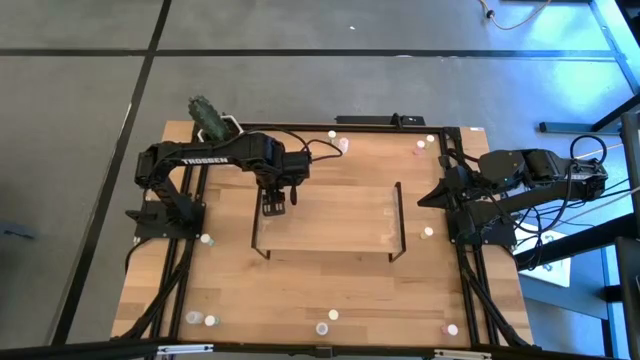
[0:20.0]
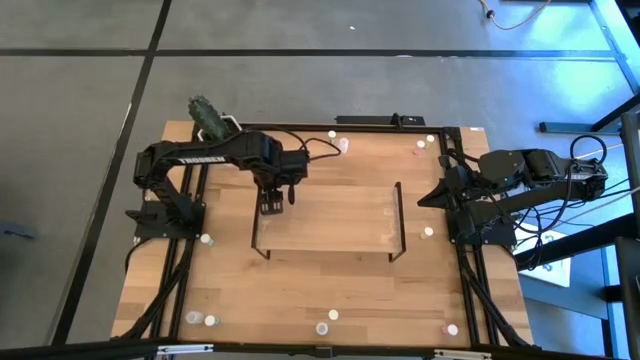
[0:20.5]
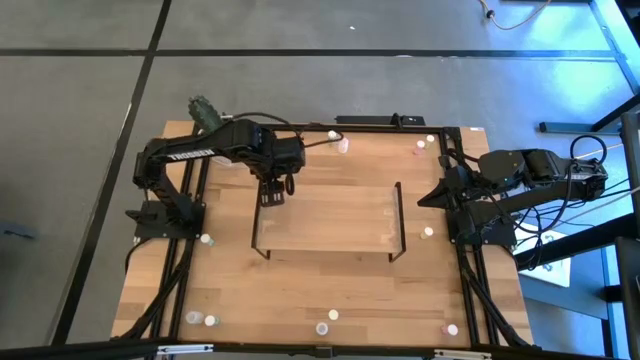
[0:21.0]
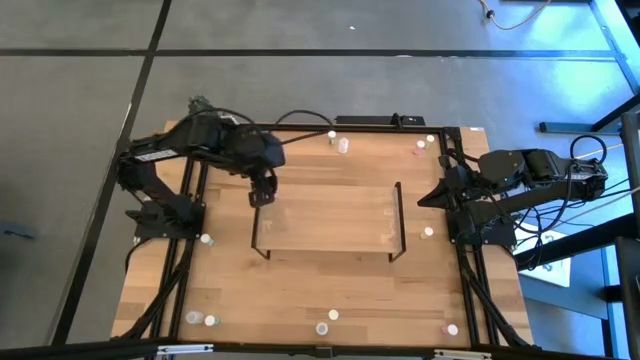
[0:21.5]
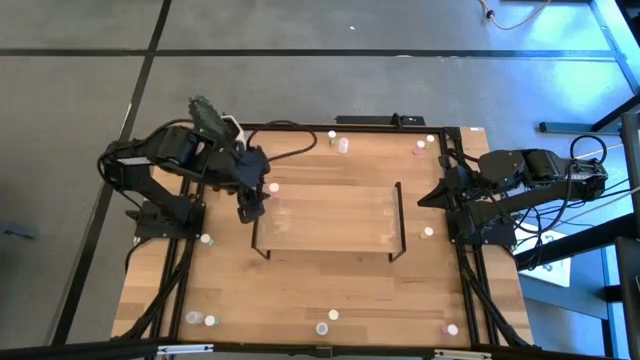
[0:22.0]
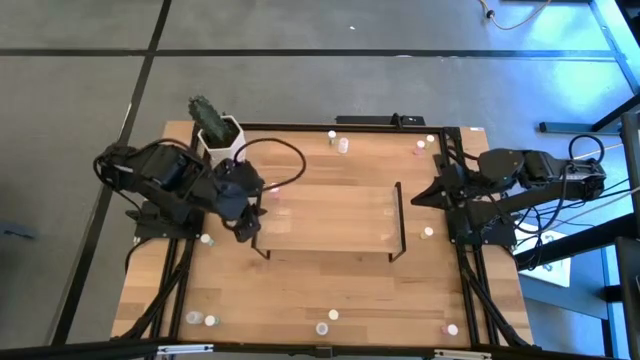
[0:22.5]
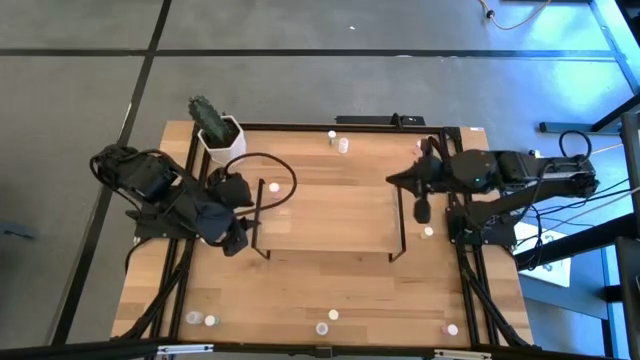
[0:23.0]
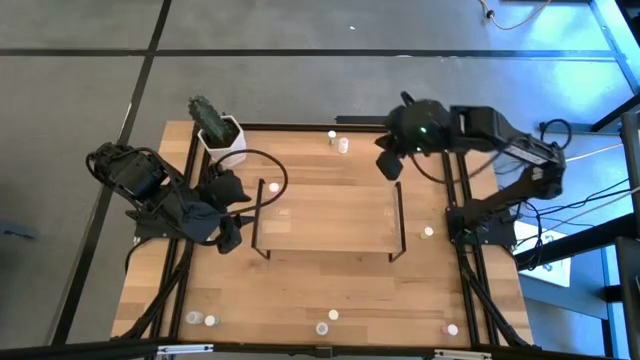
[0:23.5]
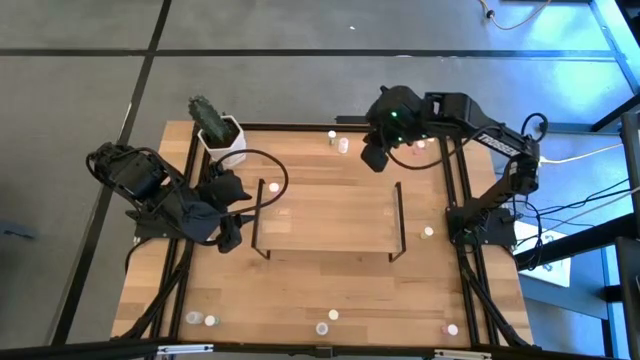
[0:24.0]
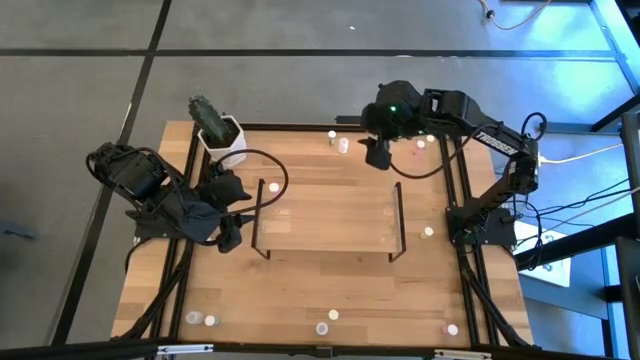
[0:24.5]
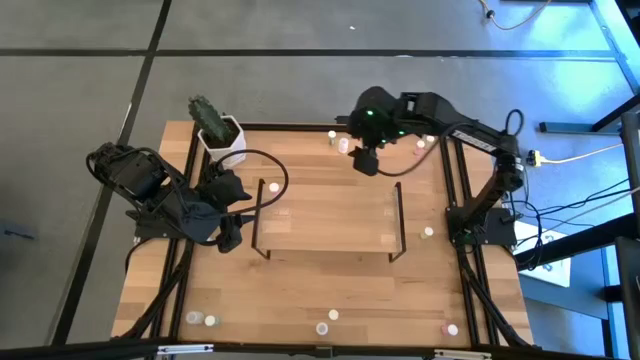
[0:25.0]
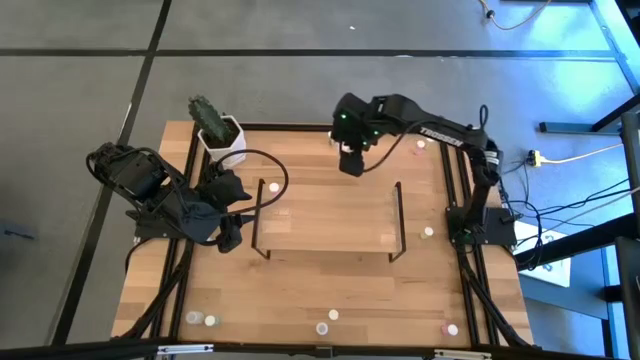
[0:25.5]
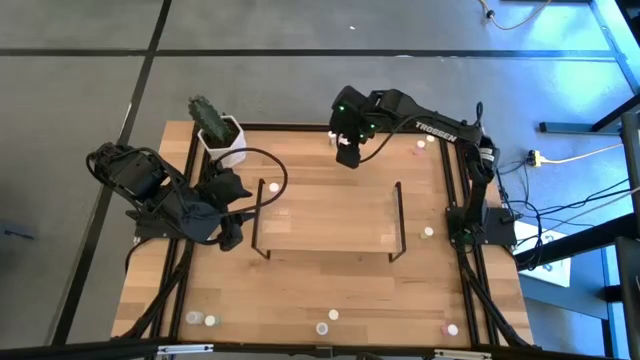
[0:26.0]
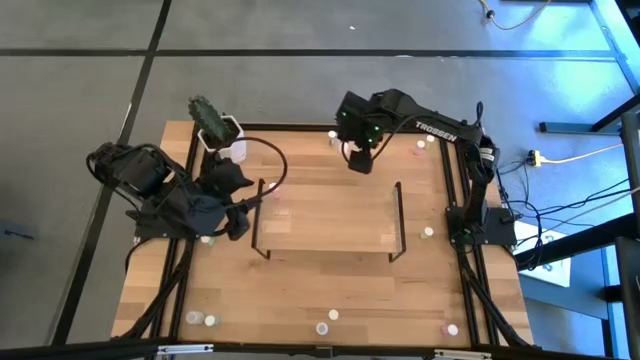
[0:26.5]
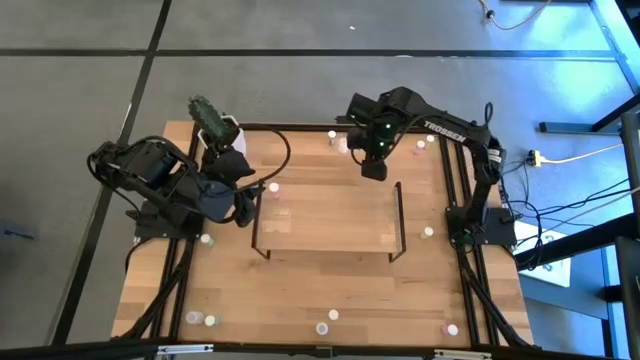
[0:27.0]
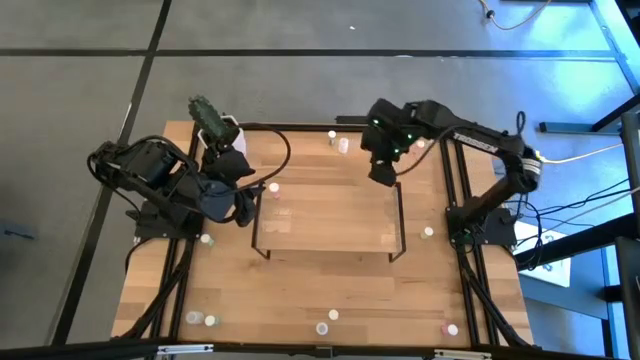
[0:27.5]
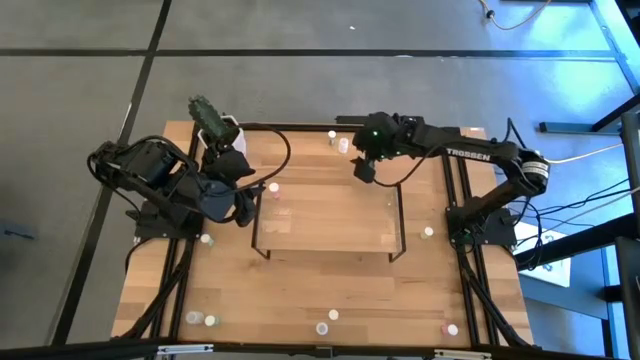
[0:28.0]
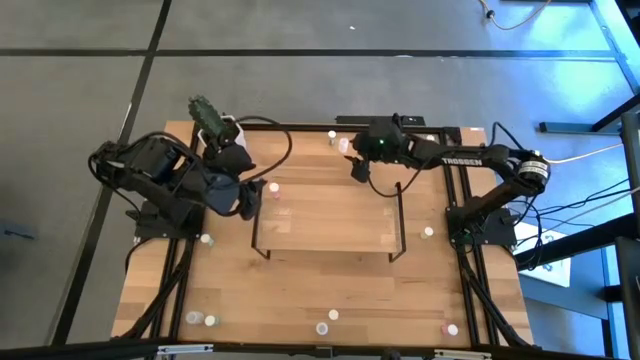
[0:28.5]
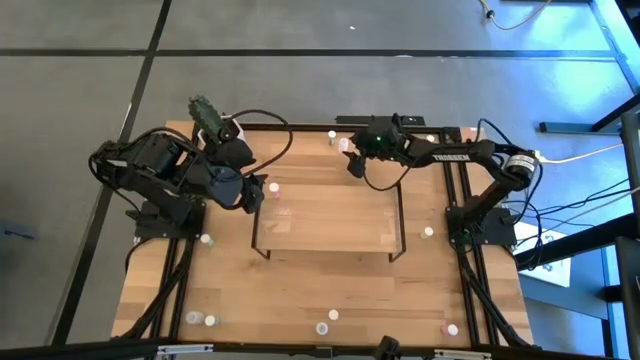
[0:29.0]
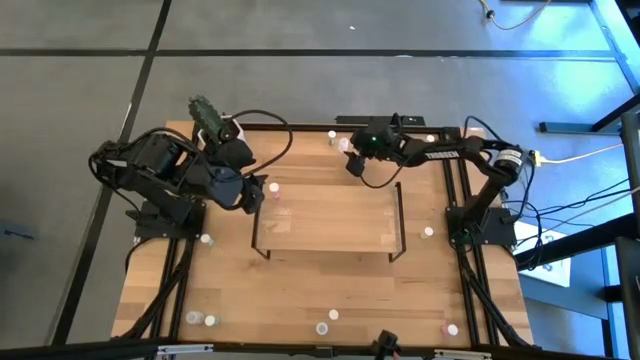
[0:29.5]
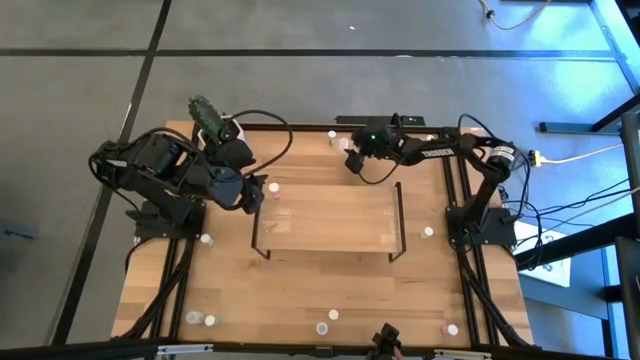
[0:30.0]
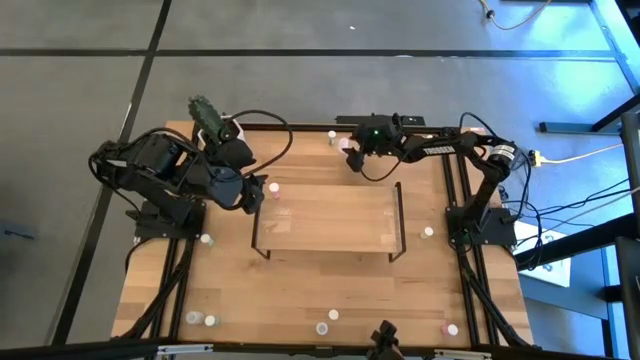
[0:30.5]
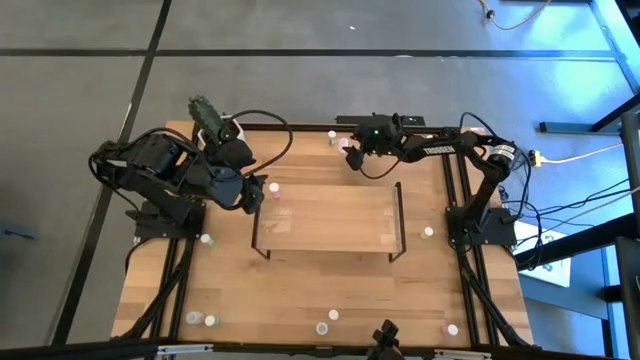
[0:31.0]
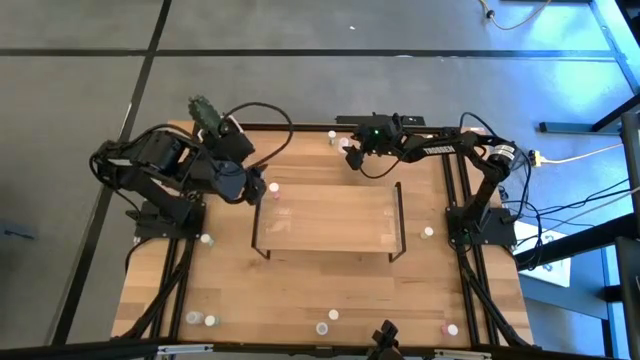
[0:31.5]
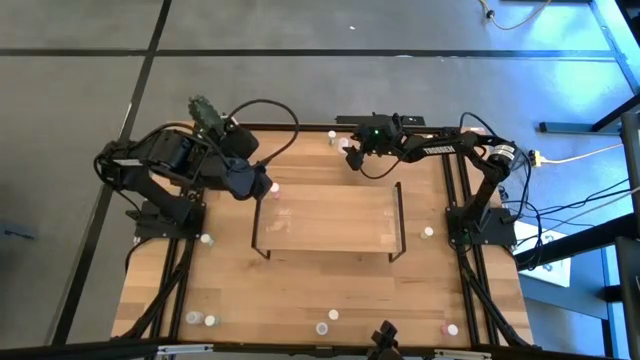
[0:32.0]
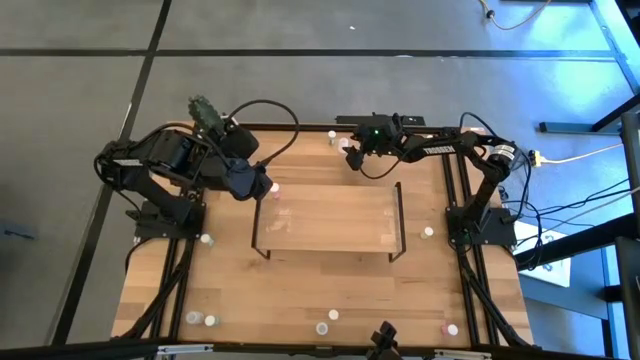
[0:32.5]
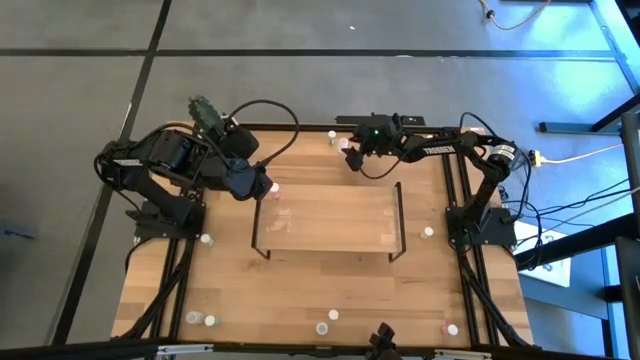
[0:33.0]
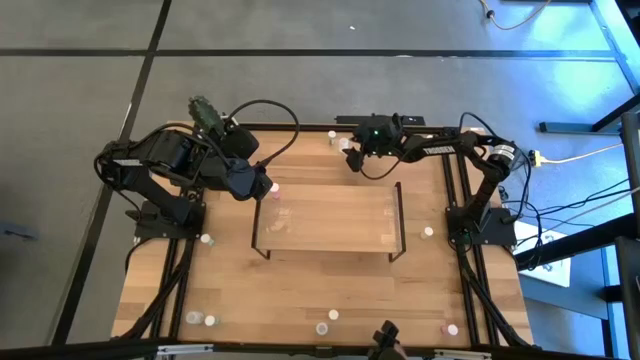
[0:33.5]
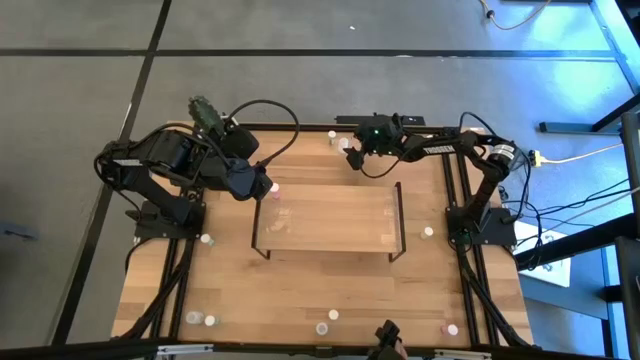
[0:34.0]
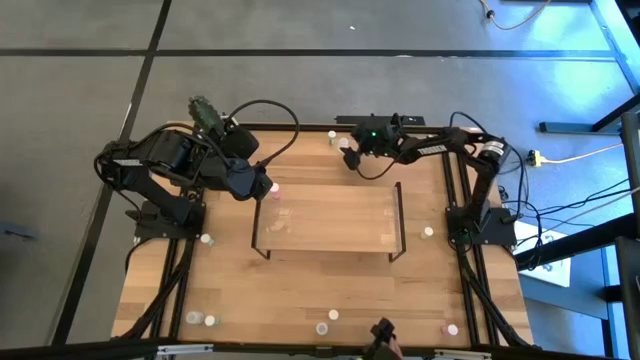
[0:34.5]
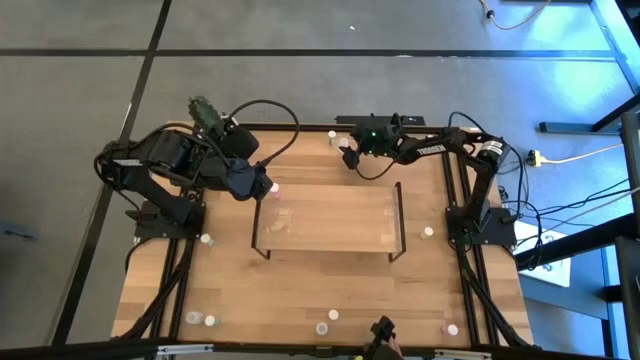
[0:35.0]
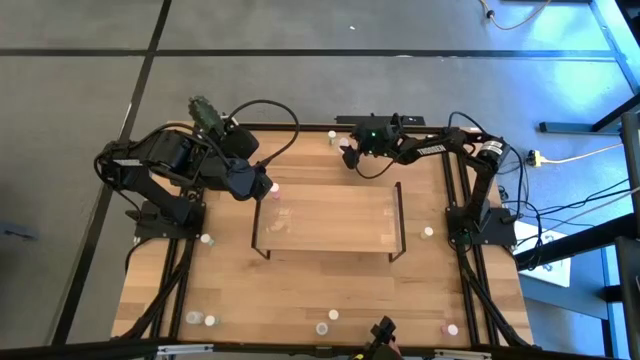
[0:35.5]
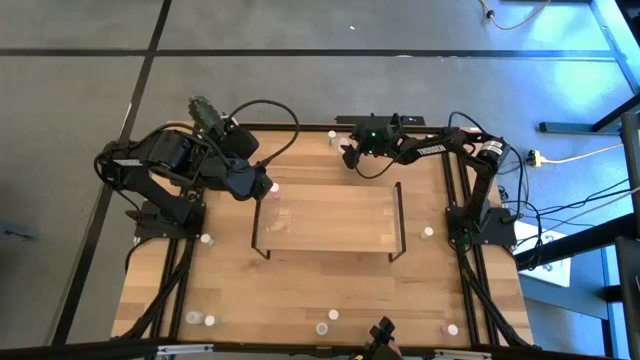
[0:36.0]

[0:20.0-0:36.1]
Task: Pick and place medicine bottles onto shelf by color
Put the top white pill bottle on the shelf

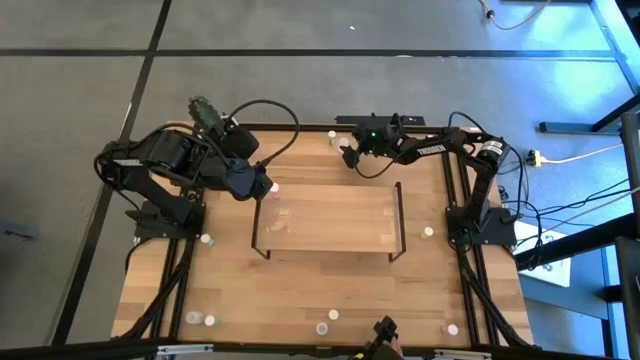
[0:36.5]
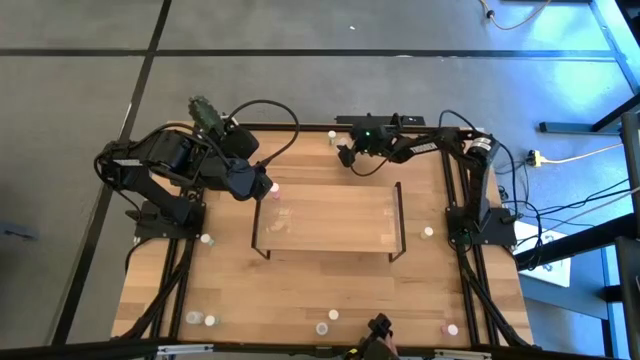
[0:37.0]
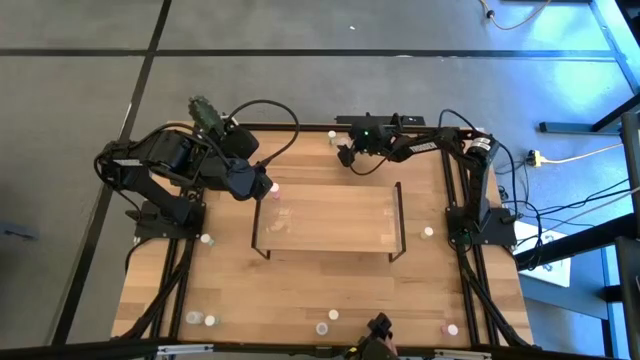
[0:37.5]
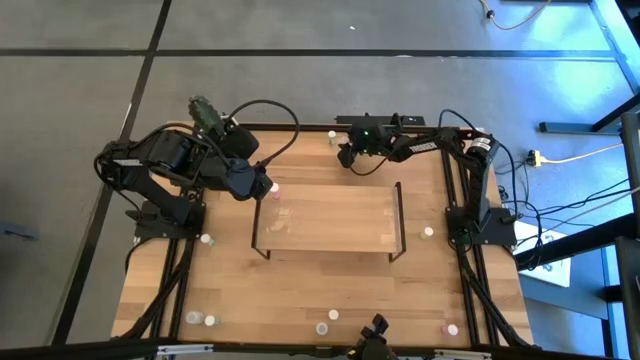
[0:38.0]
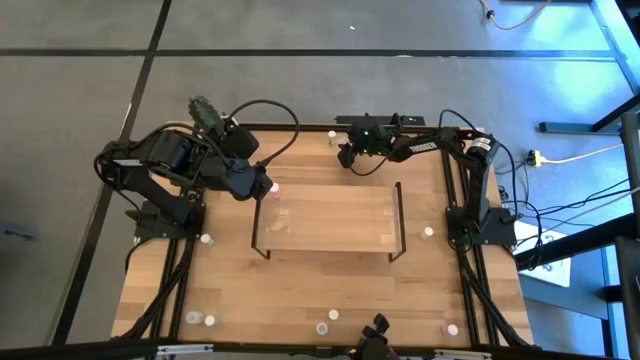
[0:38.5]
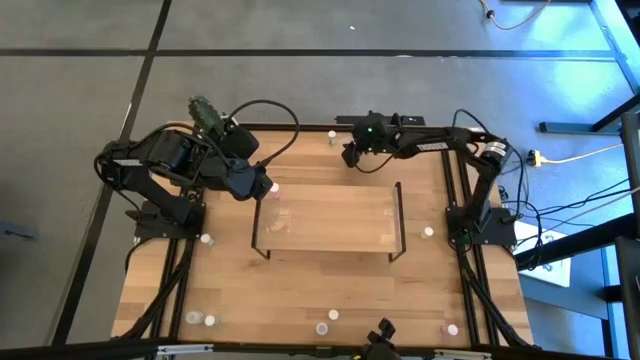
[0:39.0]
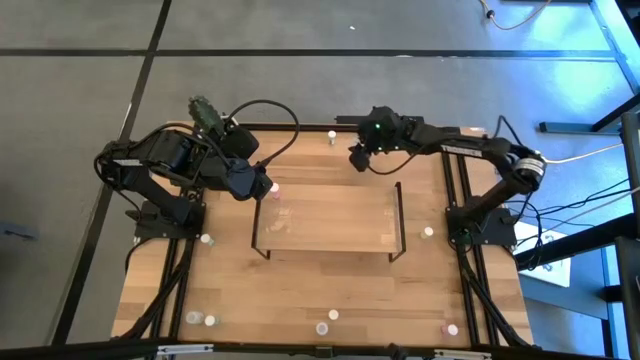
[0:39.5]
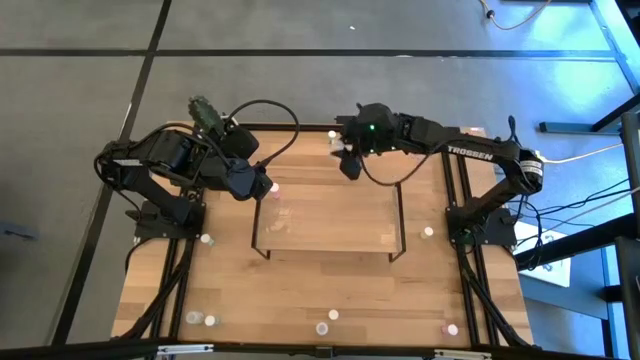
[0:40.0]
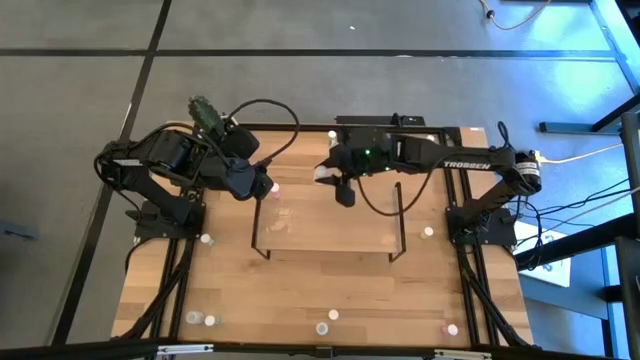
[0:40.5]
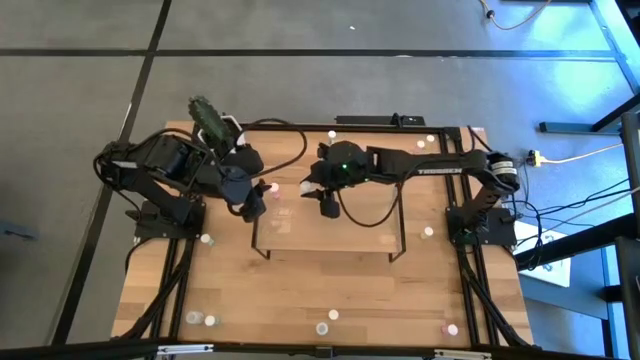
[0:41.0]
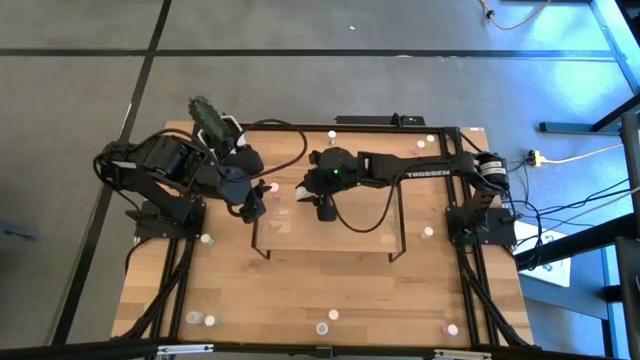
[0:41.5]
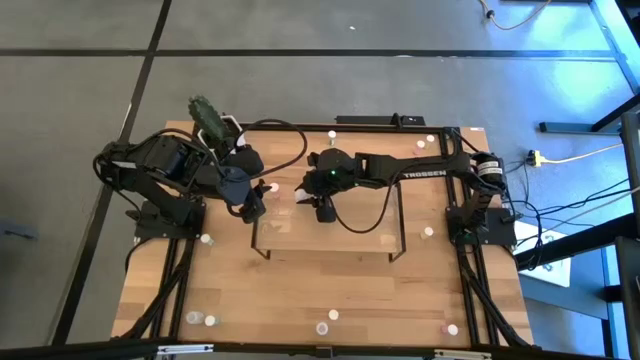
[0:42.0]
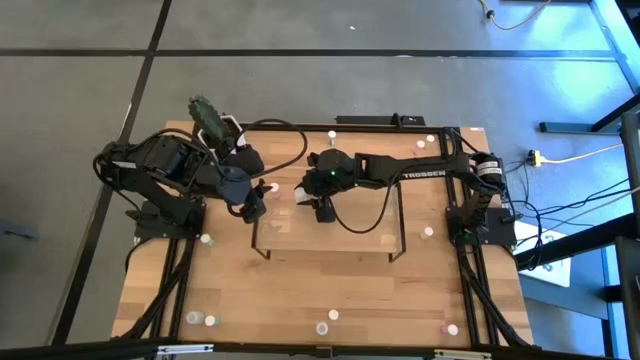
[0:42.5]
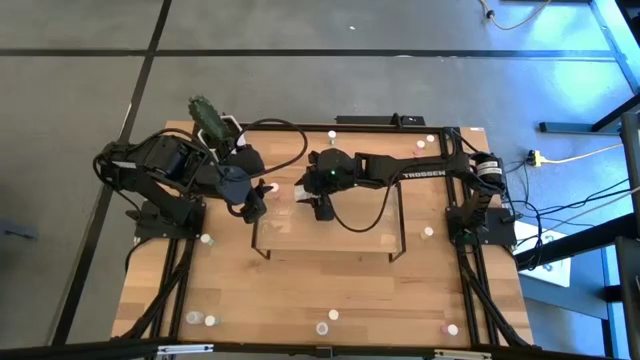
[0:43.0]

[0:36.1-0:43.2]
Put the top white pill bottle on the shelf
